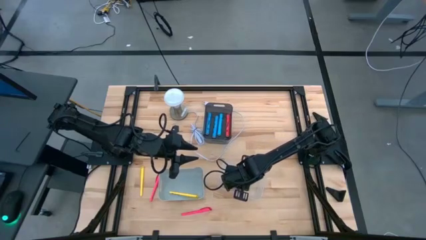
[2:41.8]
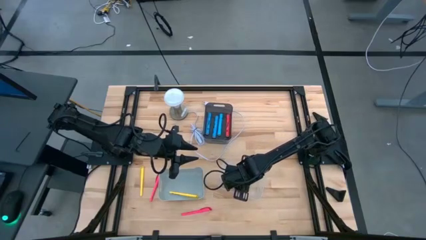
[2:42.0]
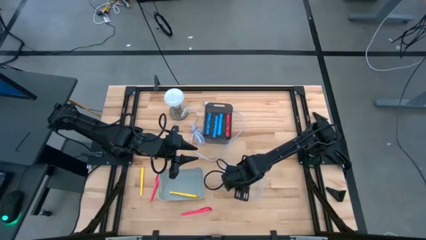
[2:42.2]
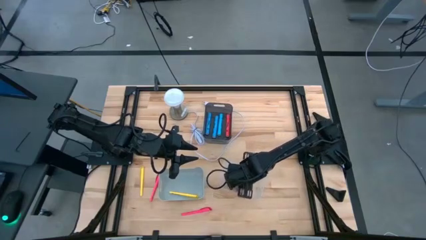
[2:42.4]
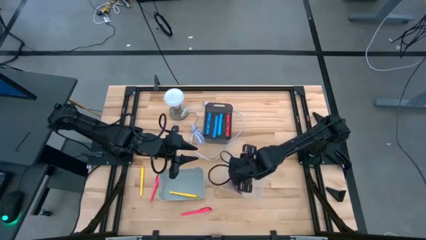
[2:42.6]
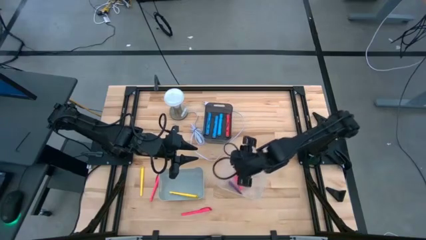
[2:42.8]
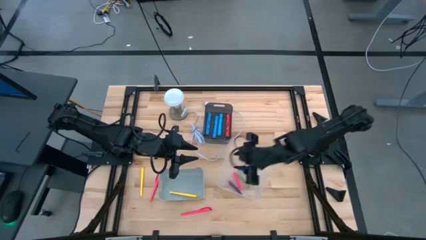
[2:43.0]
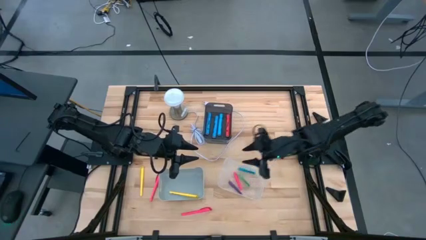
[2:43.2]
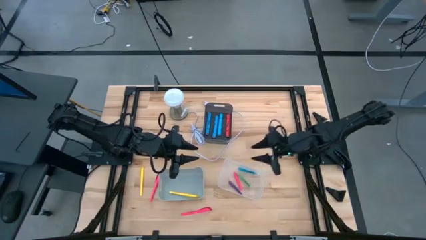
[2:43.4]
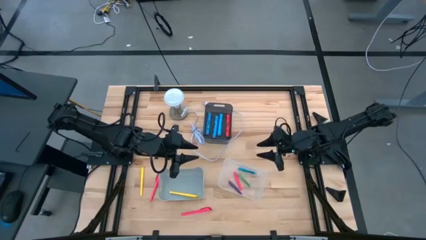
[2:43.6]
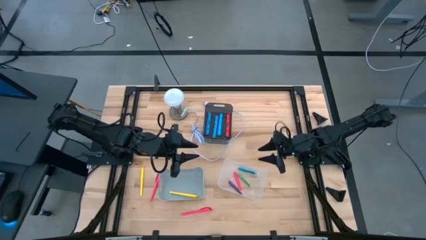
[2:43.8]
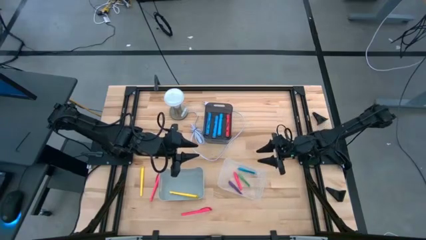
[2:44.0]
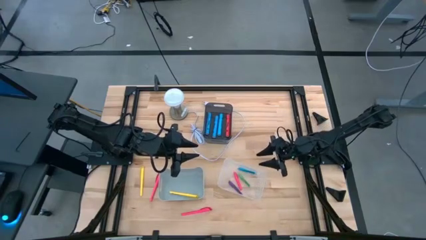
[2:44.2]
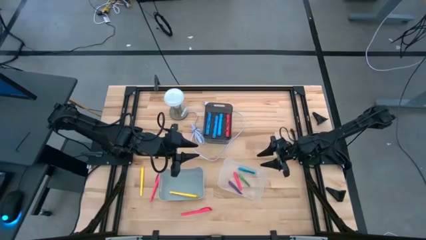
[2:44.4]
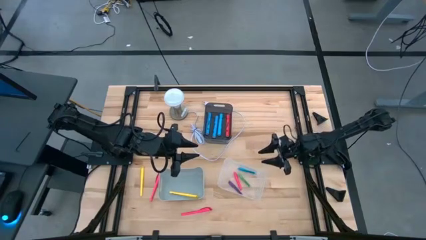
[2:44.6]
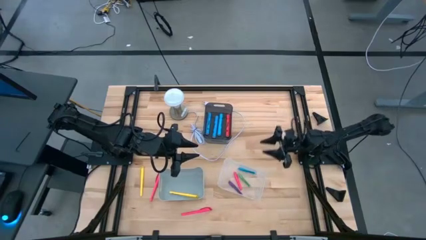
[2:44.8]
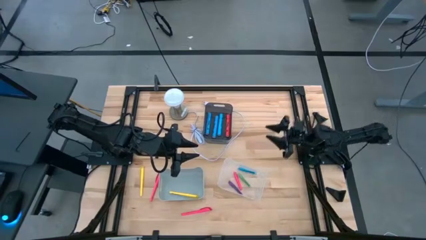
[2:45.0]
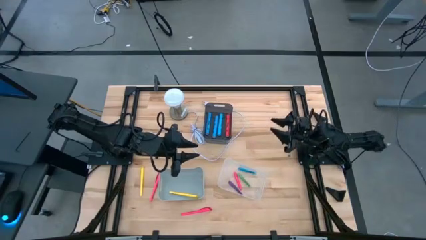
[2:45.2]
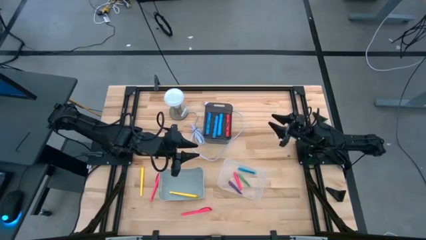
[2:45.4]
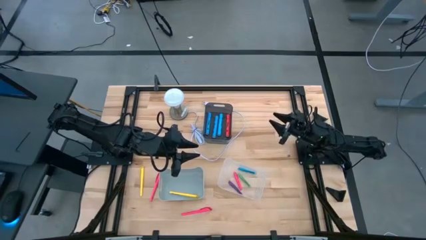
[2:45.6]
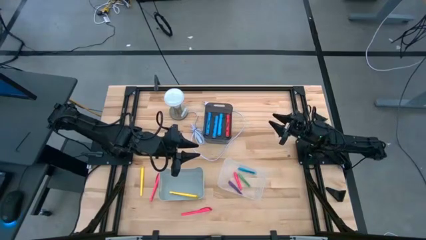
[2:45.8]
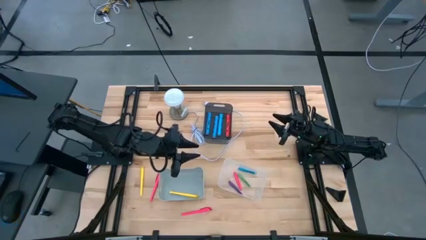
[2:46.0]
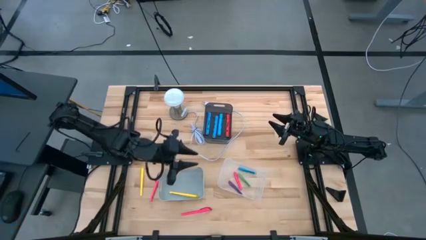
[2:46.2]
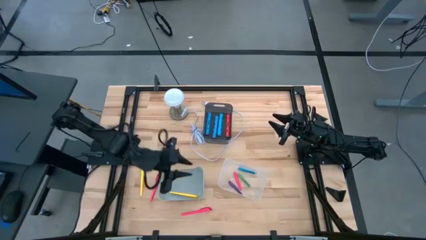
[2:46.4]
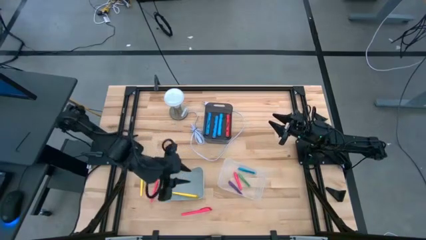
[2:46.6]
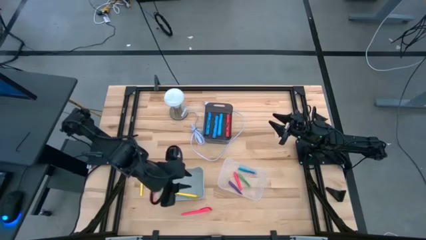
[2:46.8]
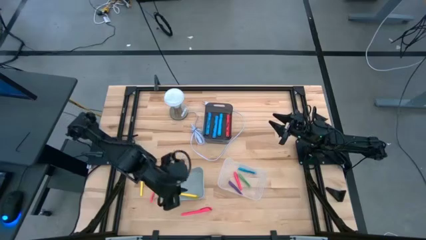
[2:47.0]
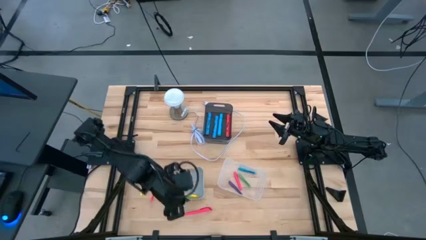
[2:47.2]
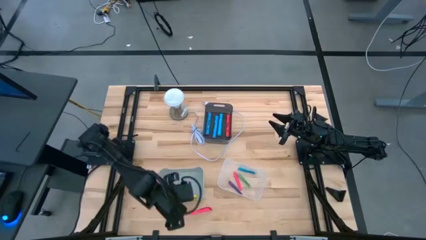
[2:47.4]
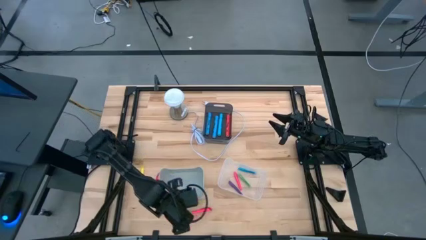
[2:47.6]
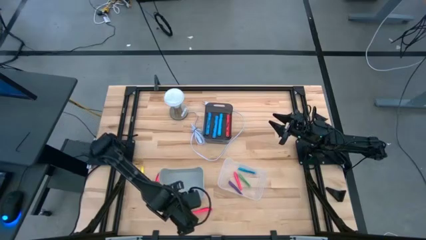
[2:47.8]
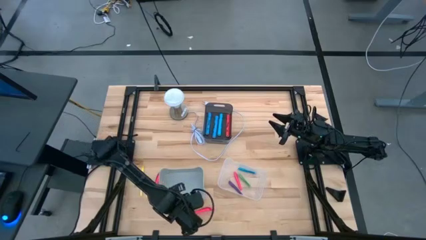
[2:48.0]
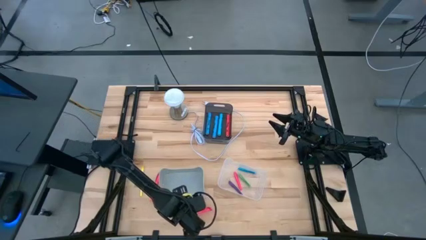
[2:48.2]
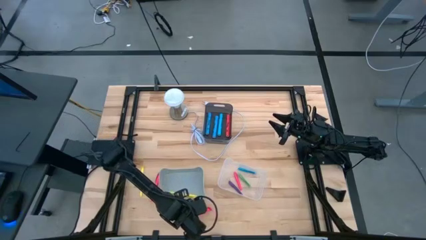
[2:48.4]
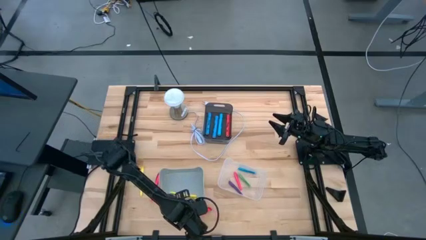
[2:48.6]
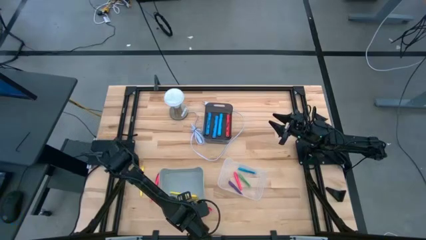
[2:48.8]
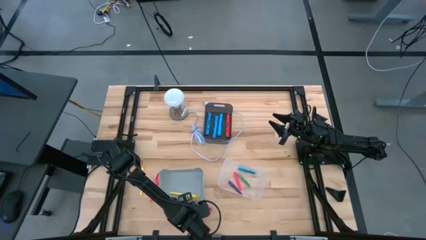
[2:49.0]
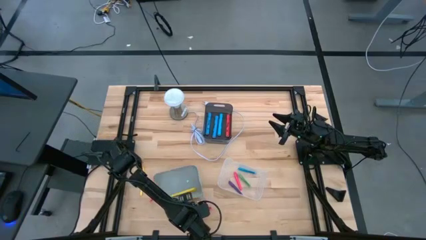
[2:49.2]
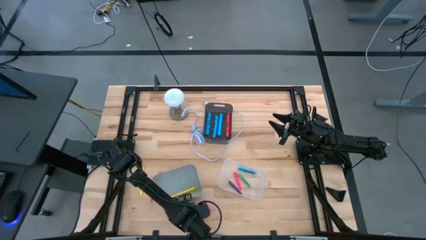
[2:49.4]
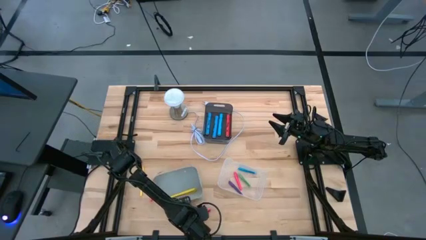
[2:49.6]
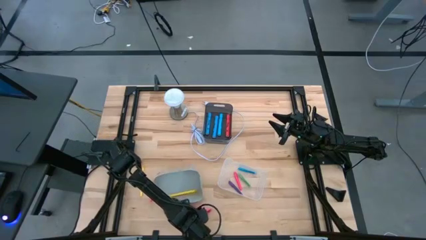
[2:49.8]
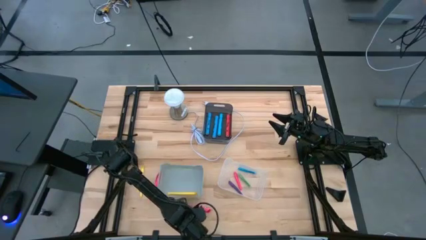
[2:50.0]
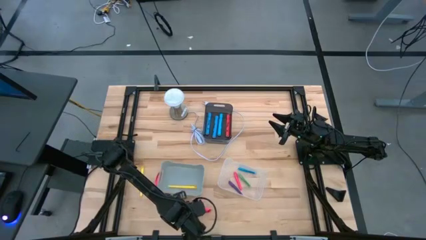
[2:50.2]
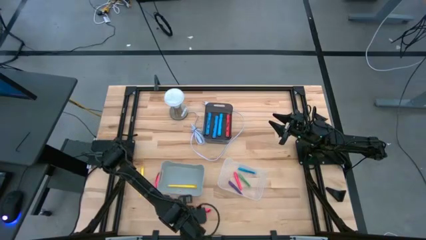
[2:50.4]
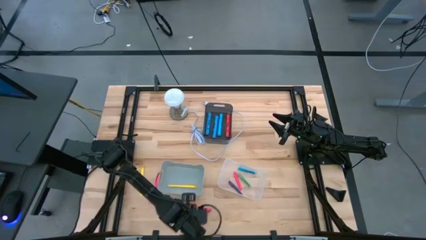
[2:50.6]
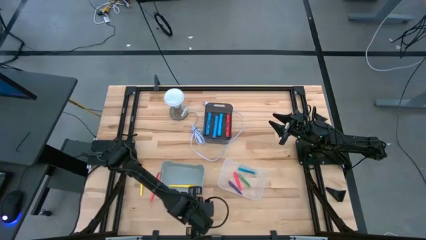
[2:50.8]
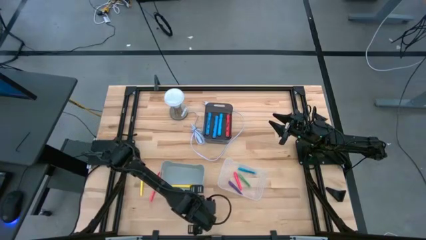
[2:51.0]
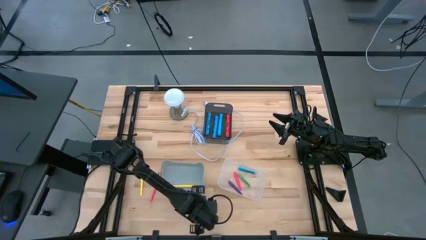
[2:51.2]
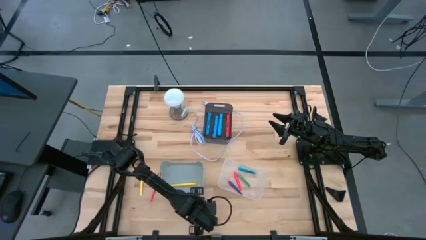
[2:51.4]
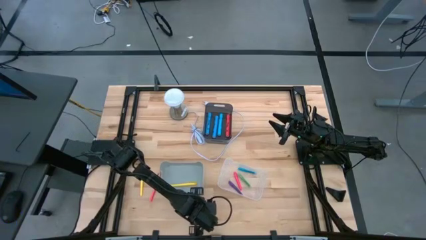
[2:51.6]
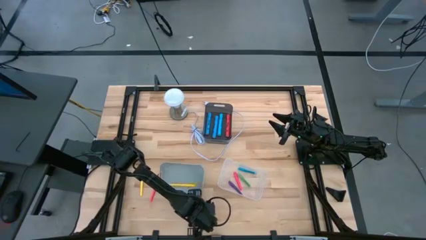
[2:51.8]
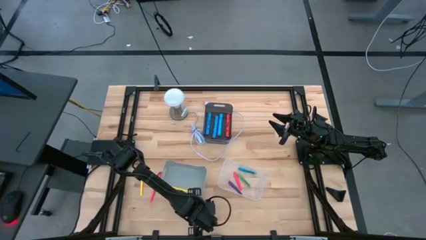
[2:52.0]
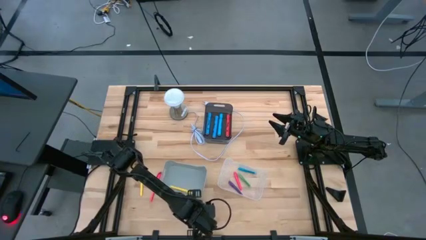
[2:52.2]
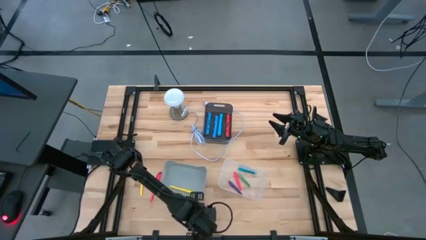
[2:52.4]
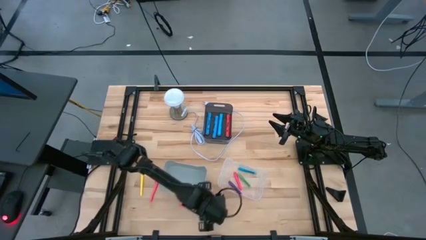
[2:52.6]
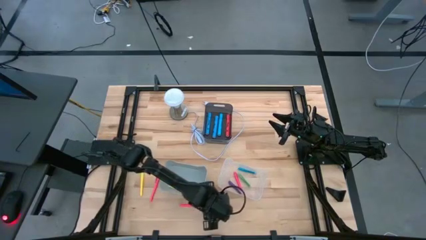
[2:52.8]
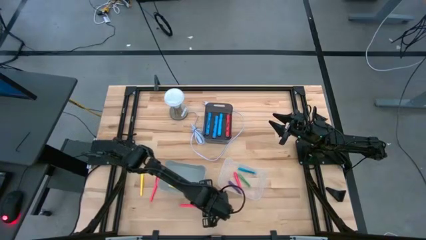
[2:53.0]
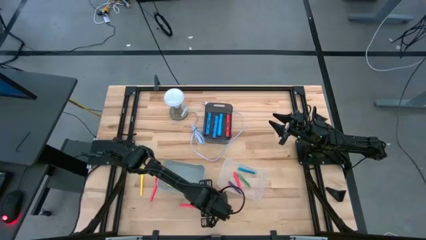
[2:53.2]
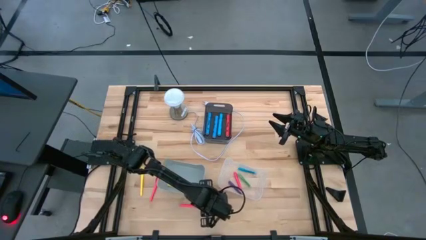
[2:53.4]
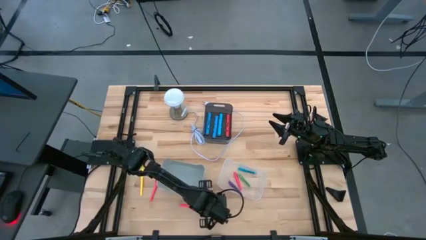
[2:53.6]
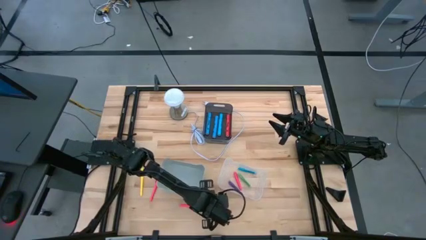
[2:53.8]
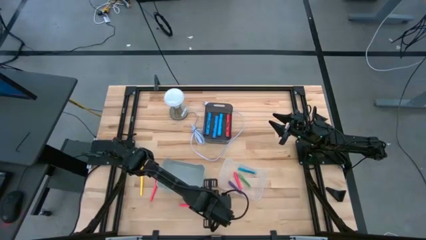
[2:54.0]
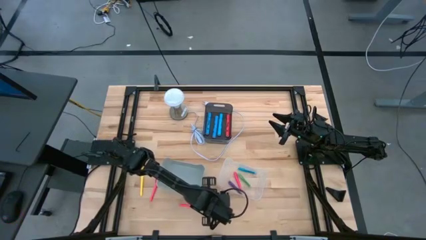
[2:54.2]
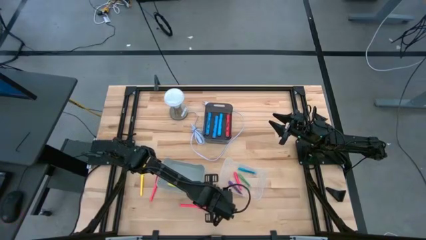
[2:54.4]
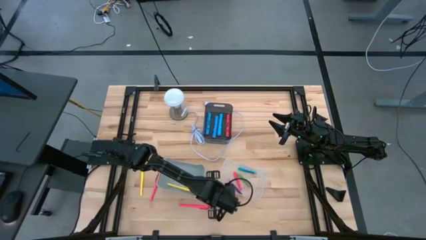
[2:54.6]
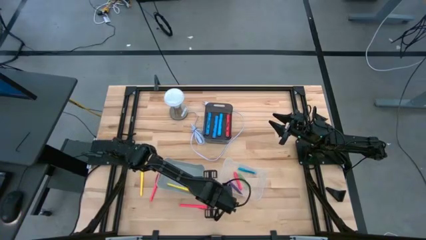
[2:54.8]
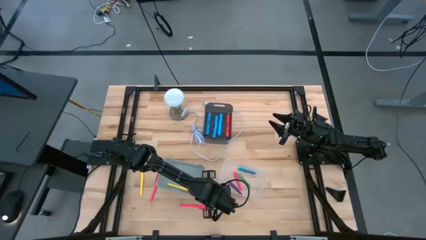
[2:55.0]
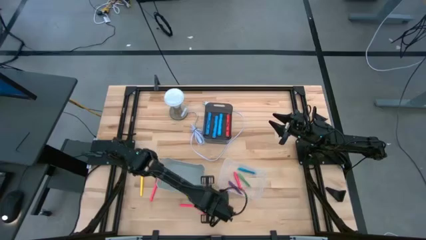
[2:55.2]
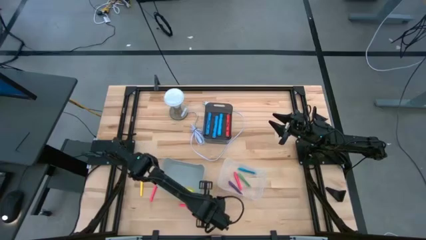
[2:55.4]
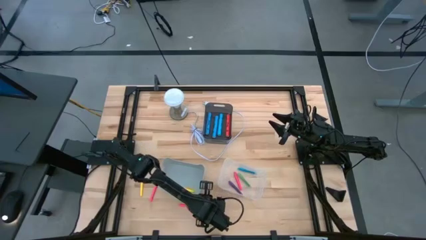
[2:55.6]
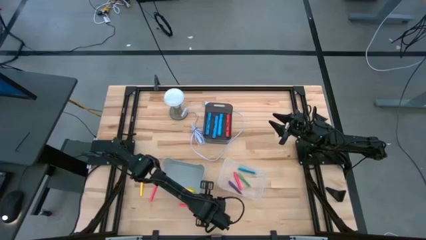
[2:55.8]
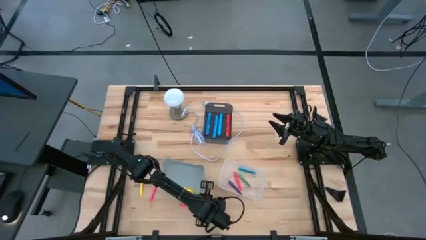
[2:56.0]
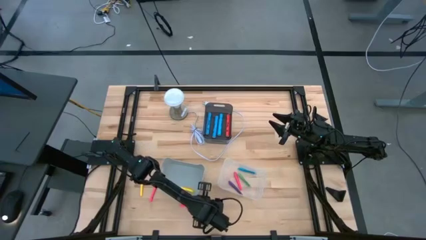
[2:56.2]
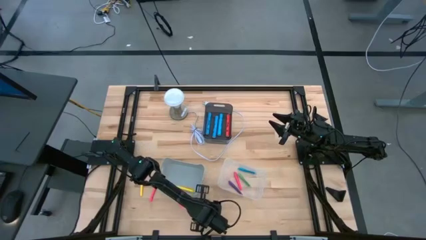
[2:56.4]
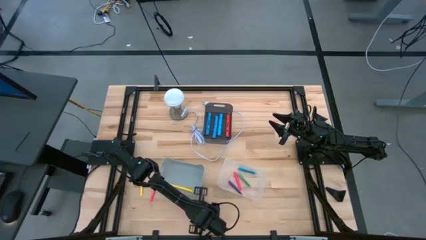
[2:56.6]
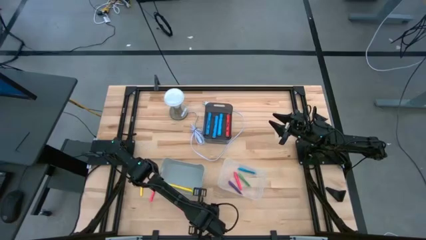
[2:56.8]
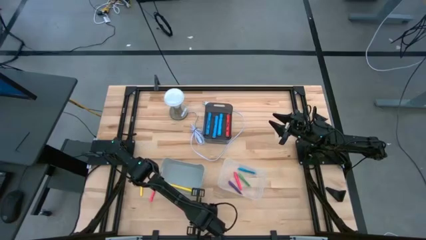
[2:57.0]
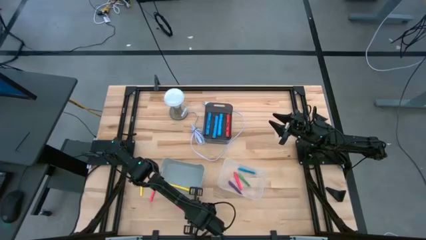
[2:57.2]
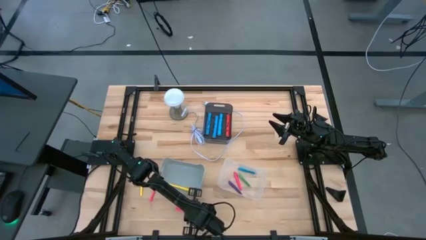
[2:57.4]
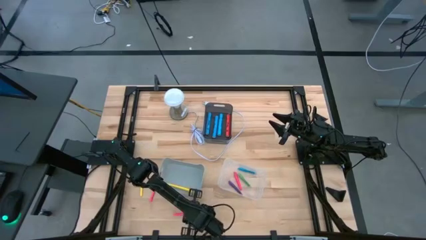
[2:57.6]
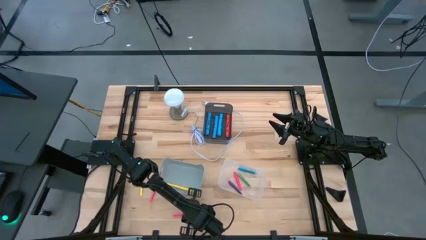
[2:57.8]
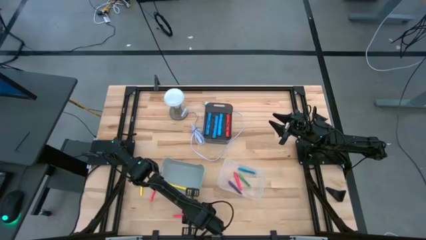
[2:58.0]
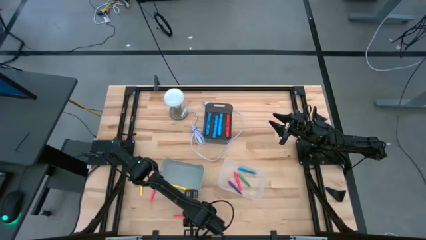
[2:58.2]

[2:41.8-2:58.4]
Task: Pick & Place Markers
Put the bottom pink highlighter pen into the gray bin

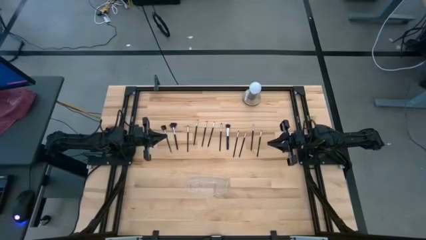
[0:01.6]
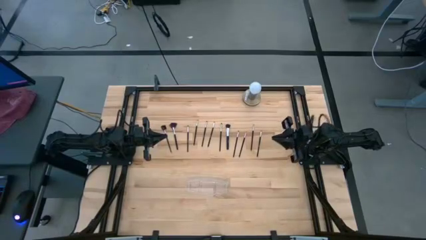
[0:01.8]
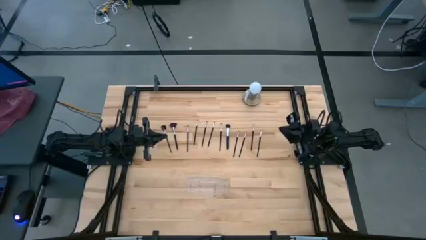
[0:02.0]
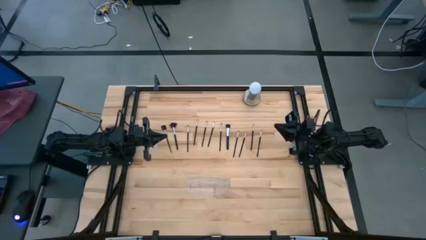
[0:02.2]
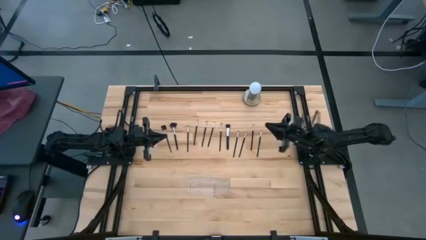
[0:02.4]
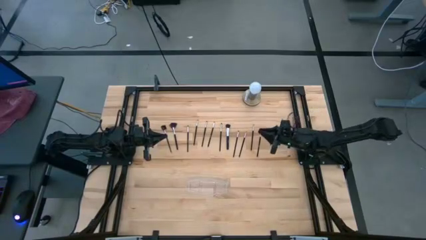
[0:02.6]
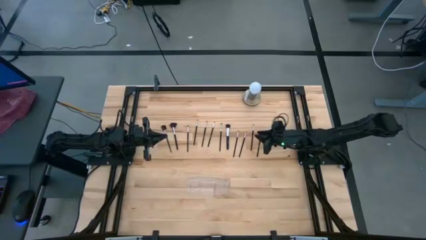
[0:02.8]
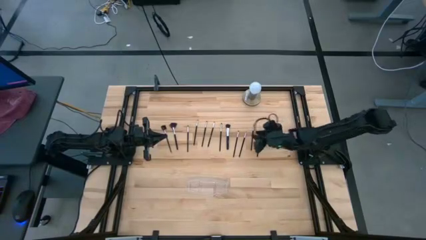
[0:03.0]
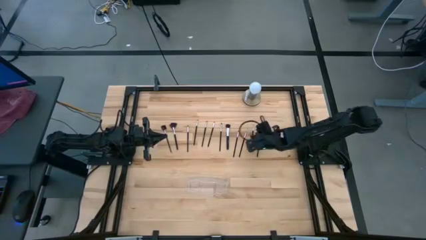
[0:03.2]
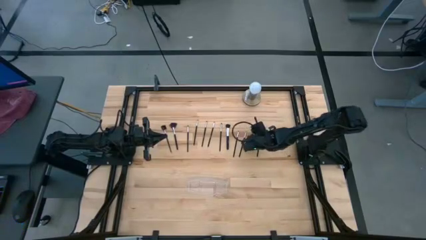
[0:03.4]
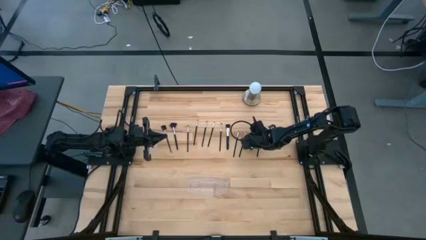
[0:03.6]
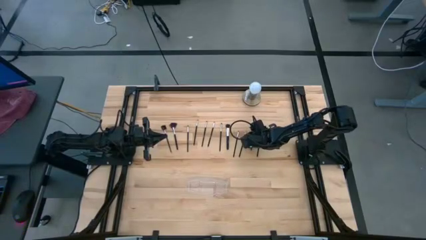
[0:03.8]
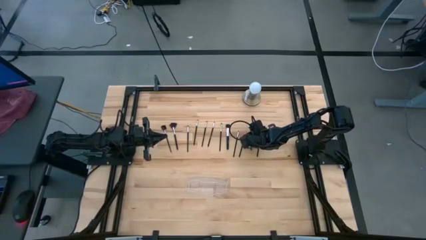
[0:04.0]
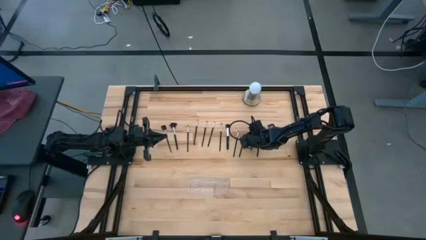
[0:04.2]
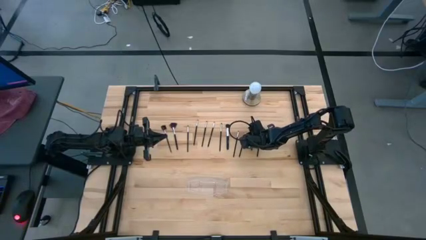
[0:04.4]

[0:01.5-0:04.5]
Task: Put items in baskets/containers
Put the black eyeshadow brush into the transparent organizer
